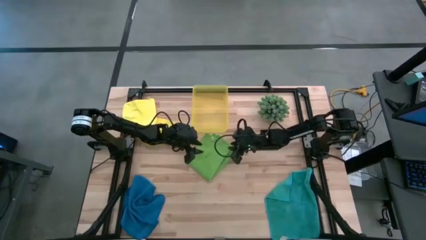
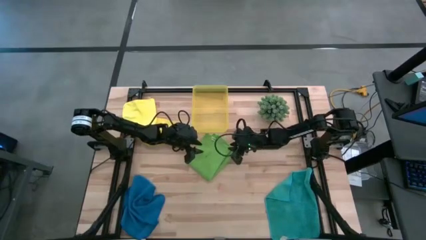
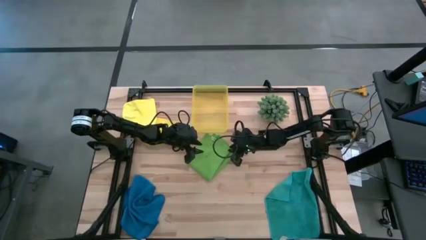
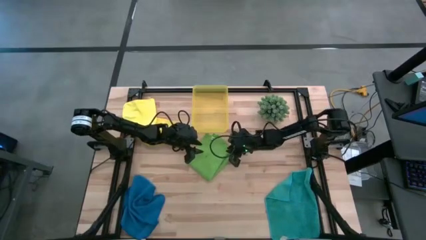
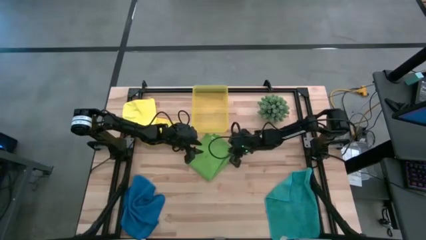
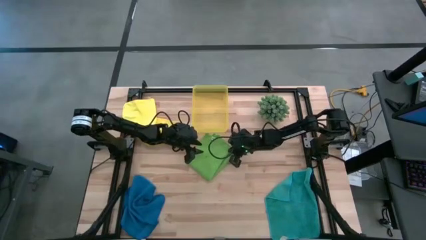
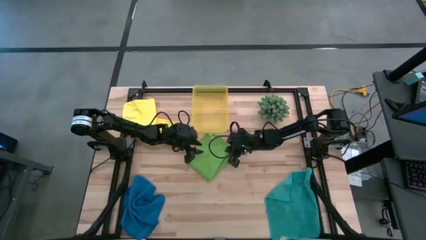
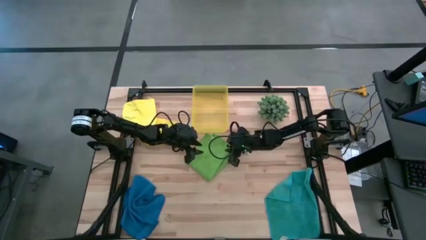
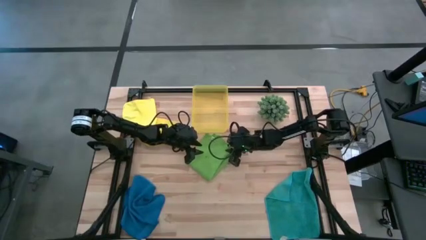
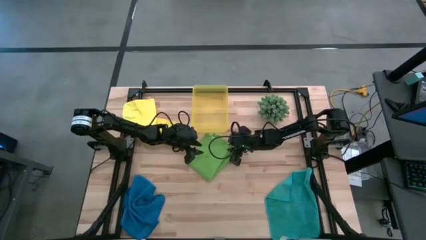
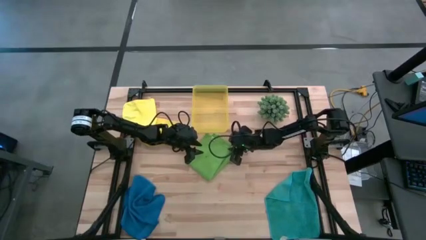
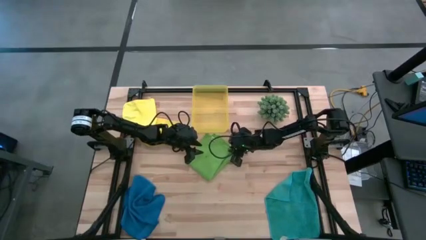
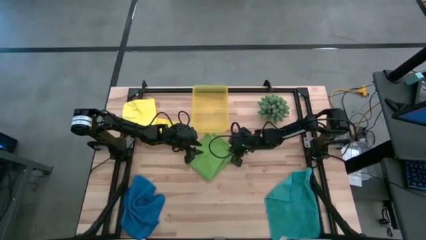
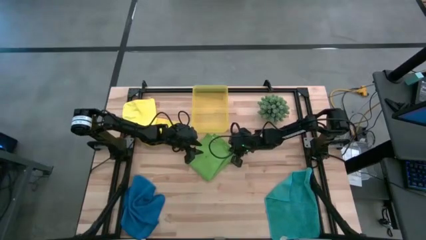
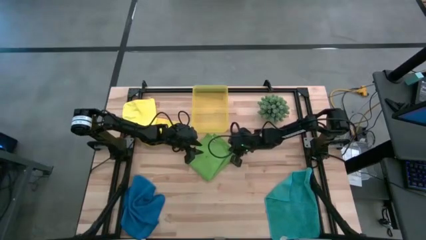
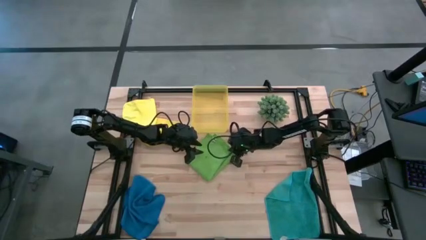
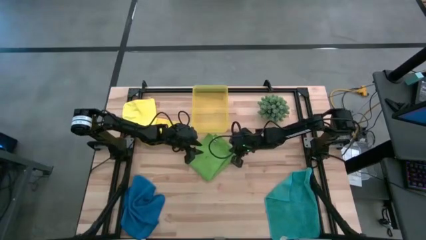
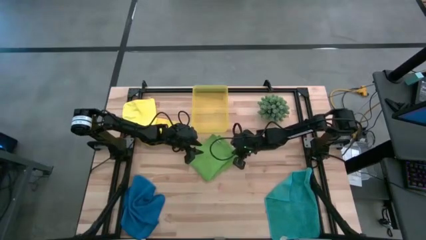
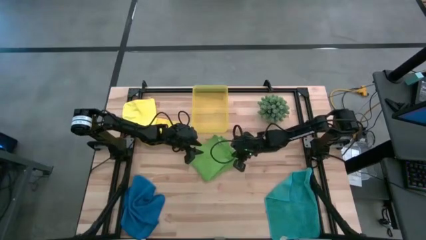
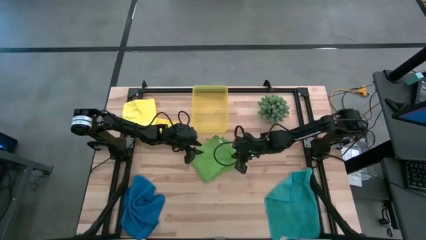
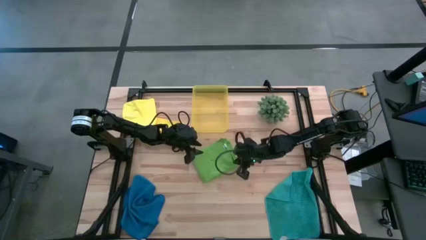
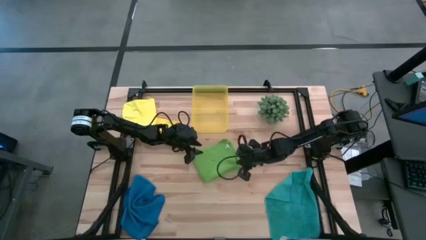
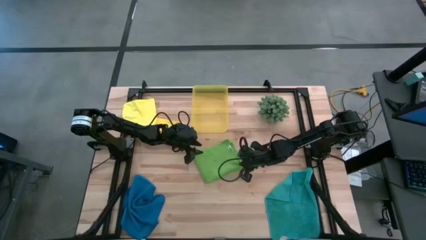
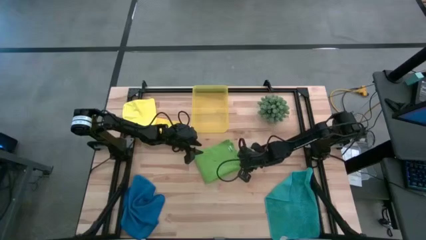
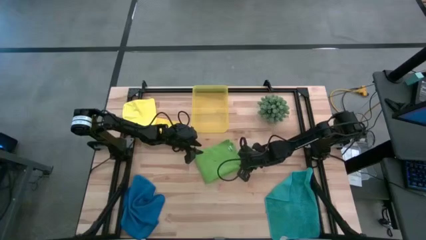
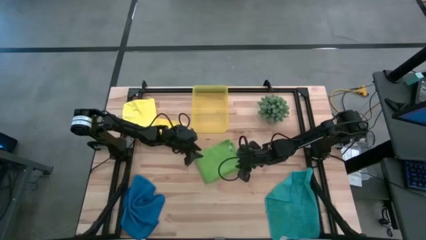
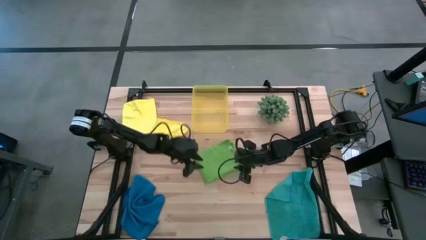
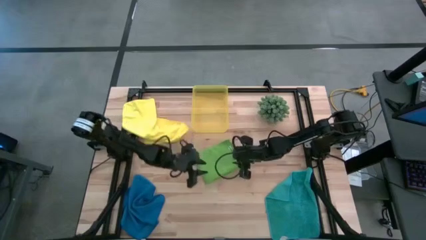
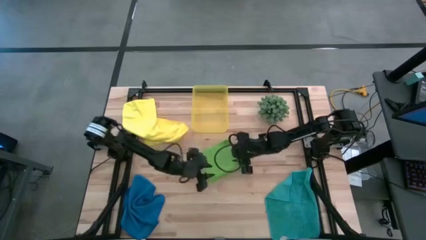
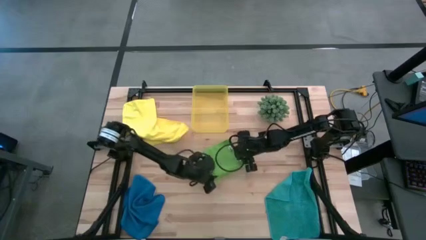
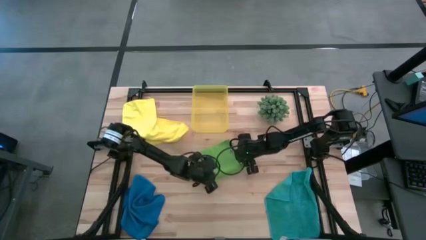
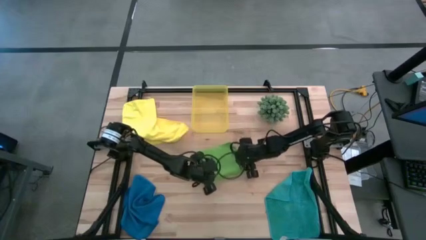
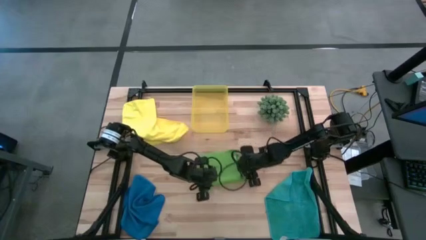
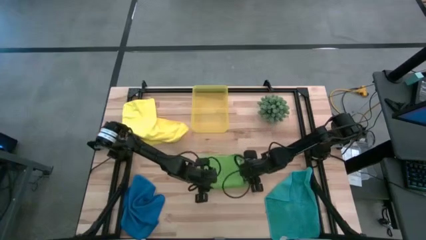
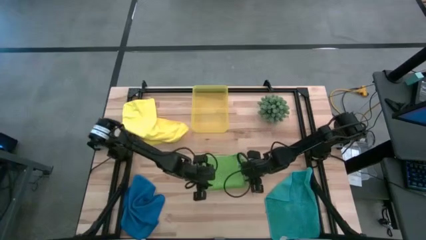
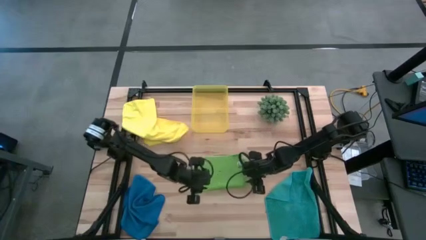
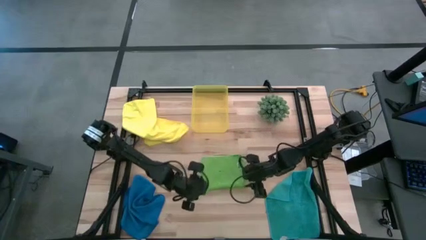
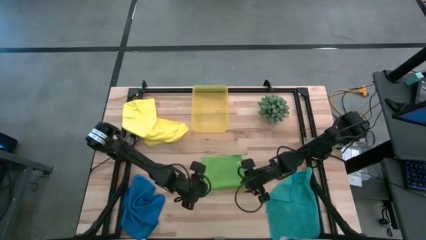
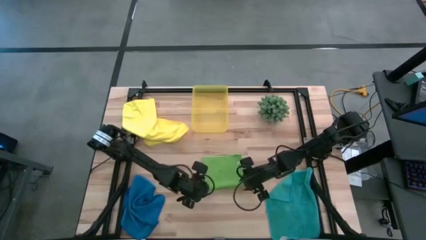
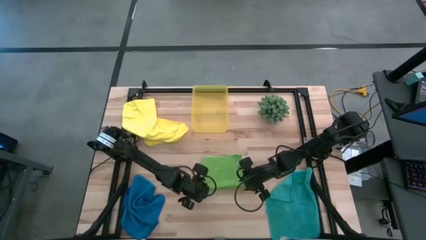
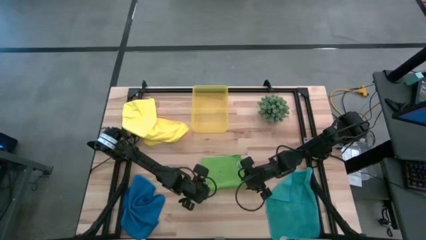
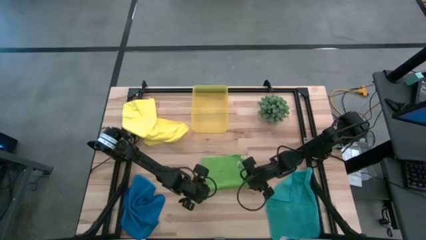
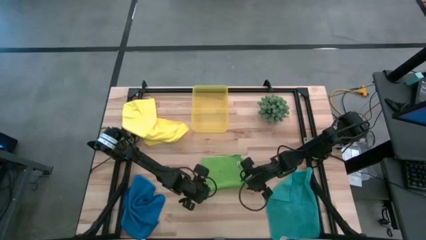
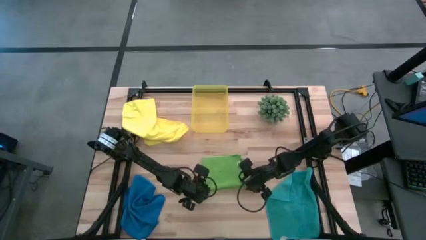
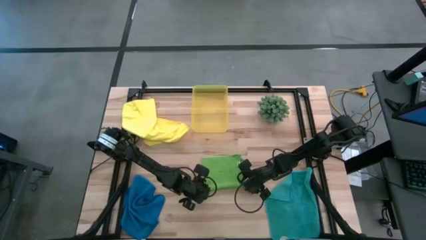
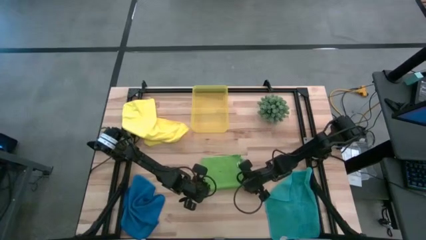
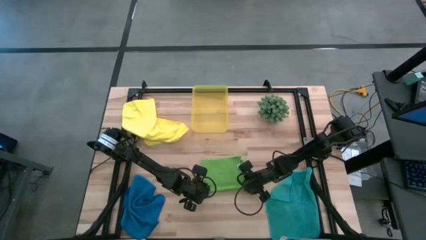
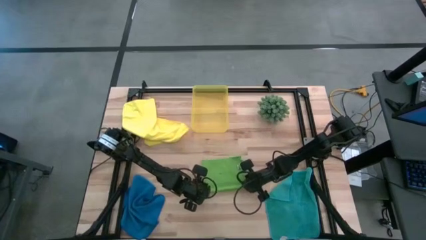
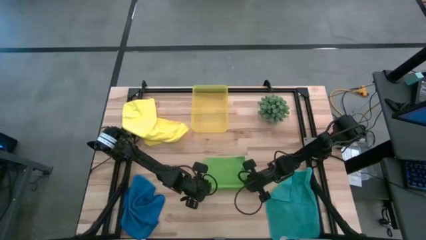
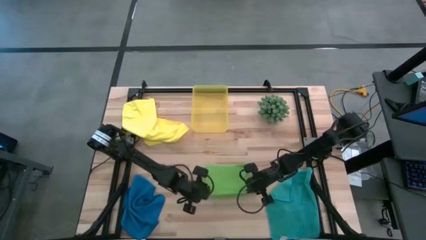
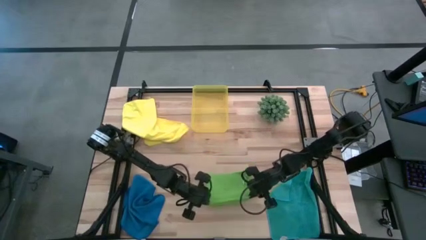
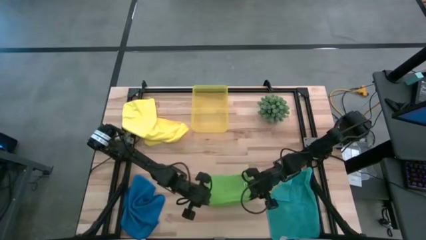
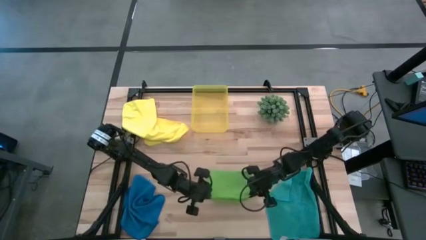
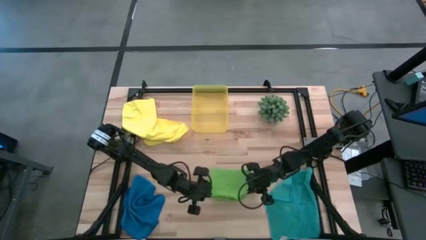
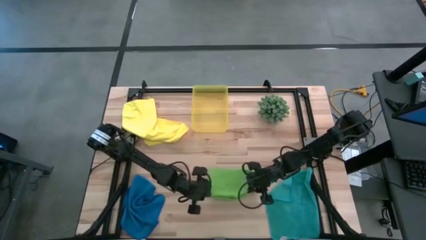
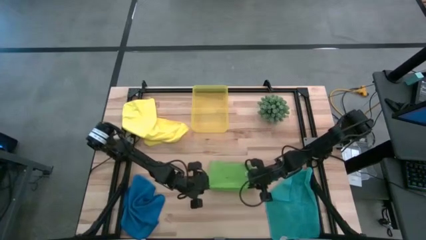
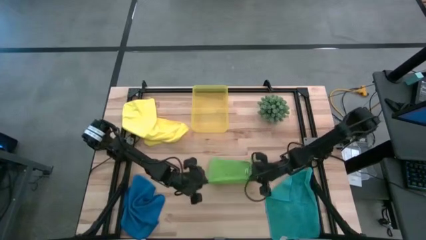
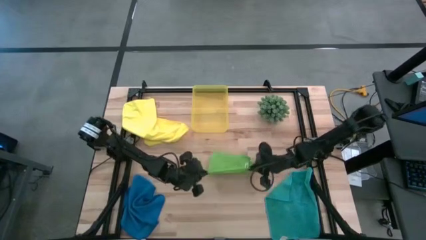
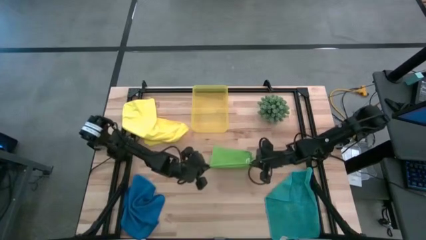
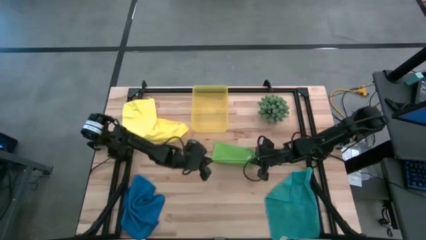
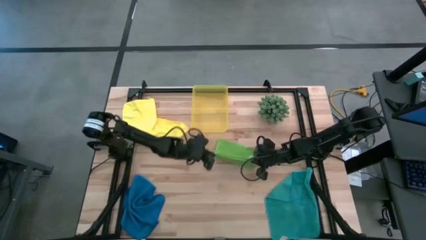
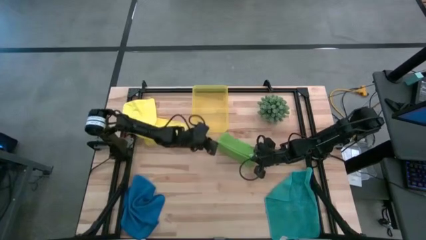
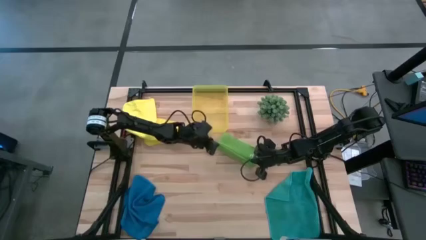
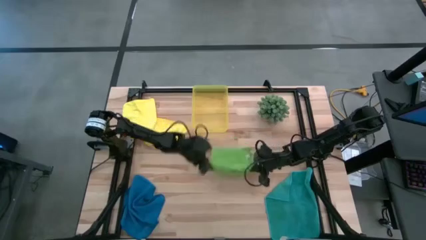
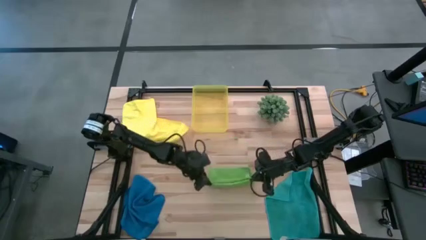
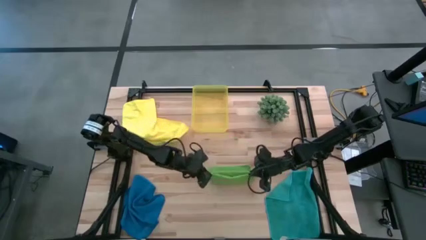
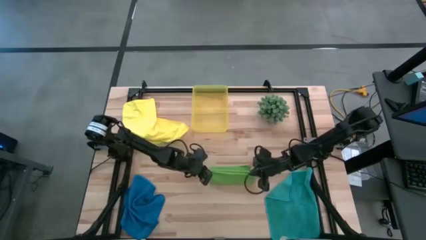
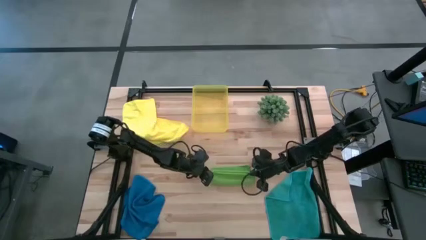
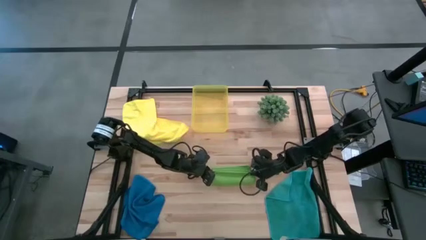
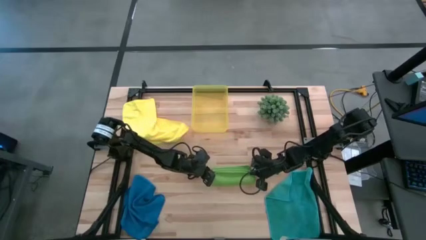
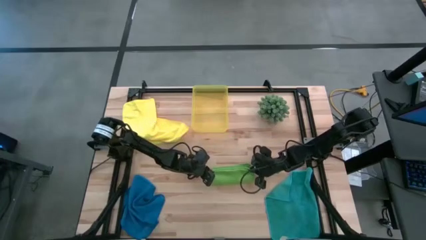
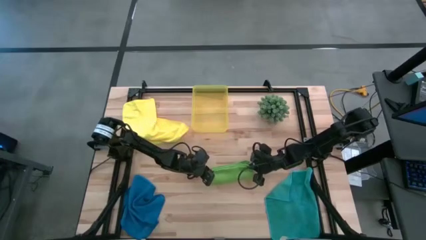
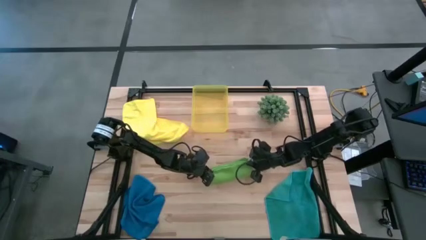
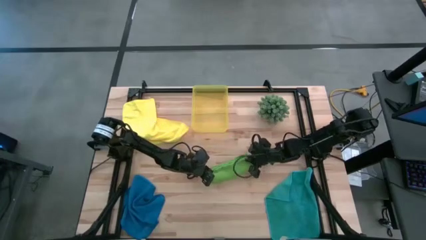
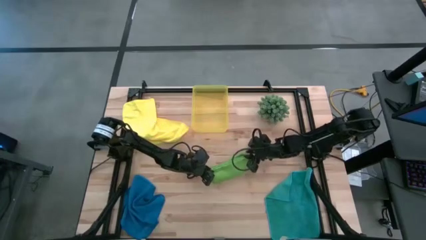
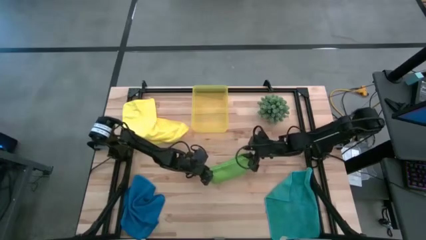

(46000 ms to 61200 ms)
Task: Fold microfiber towels
Fold the green microfiber cloth

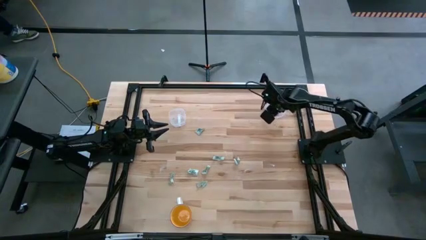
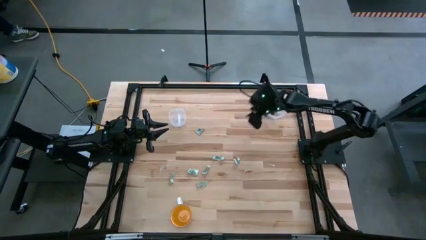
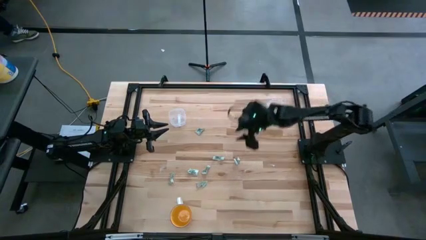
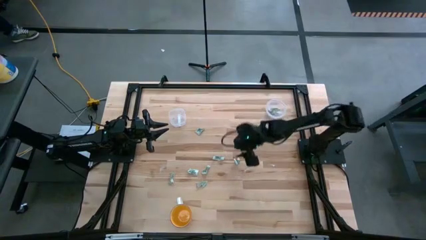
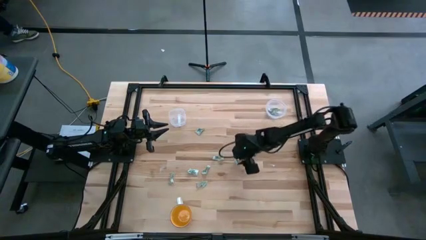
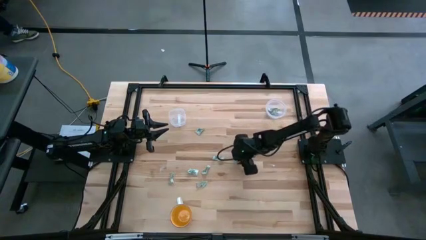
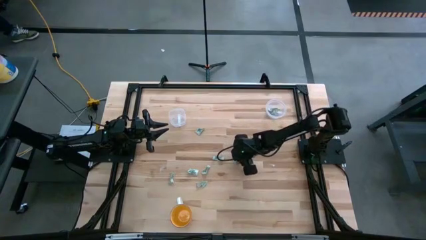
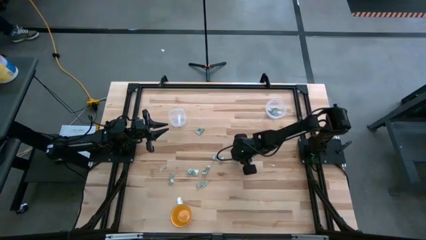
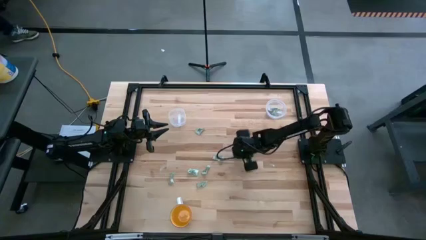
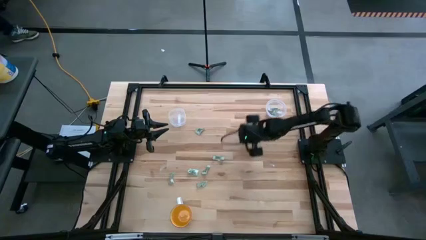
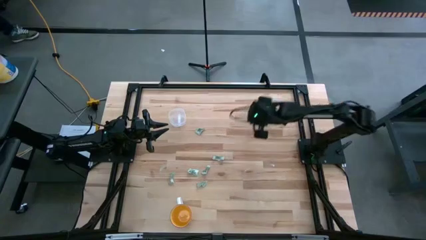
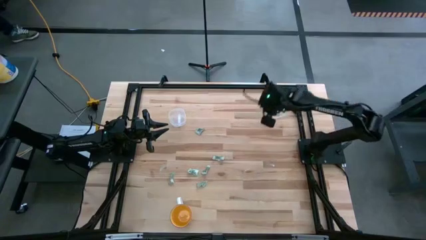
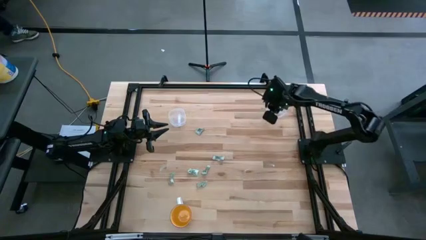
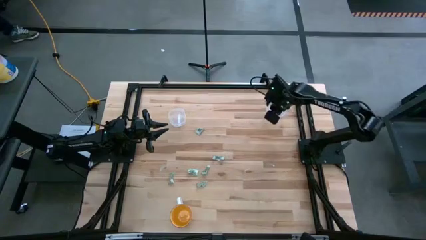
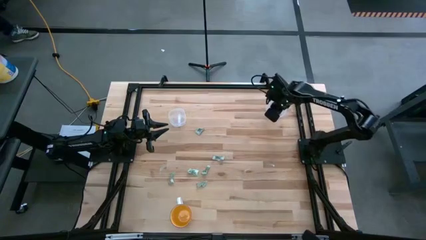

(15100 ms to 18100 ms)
Task: Pick and place items into bin
Put the stevia packet into the right transparent bin
